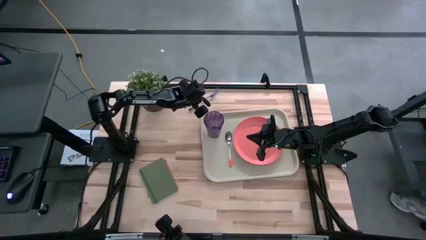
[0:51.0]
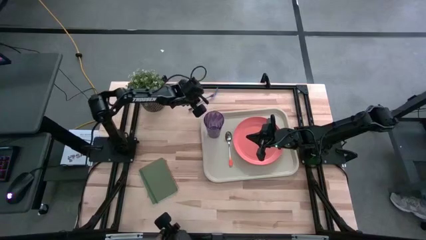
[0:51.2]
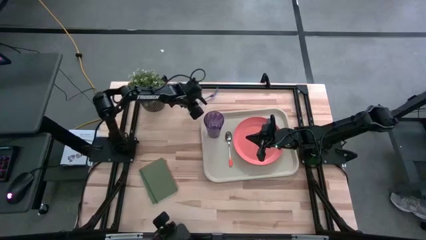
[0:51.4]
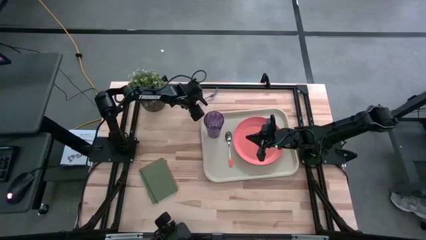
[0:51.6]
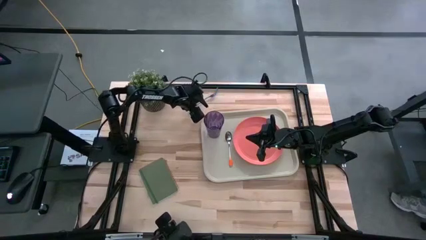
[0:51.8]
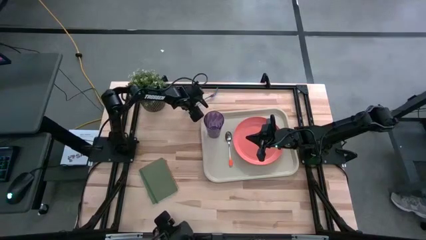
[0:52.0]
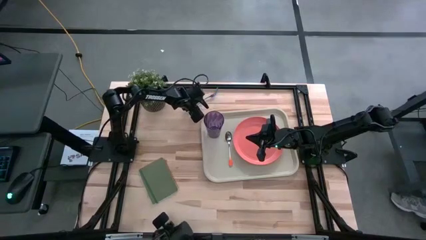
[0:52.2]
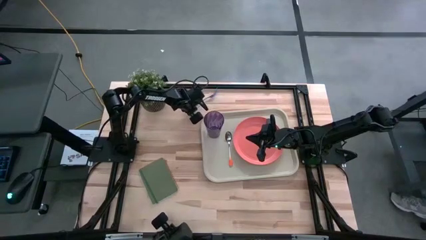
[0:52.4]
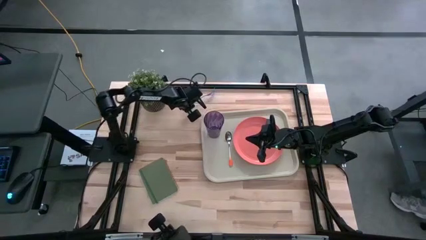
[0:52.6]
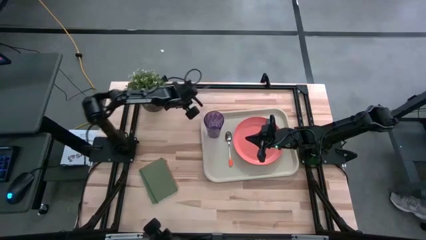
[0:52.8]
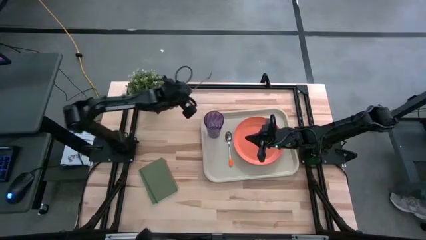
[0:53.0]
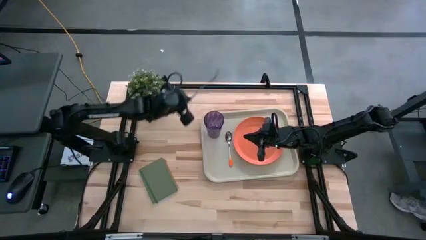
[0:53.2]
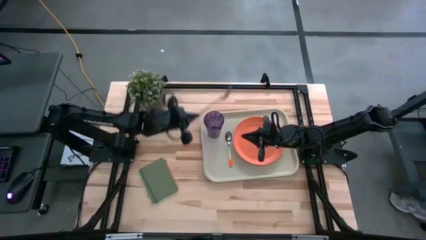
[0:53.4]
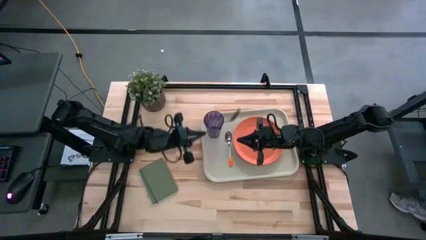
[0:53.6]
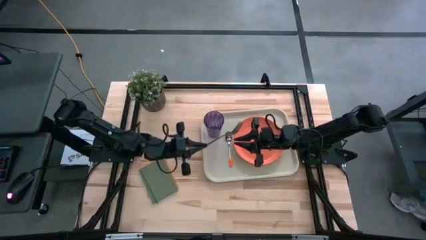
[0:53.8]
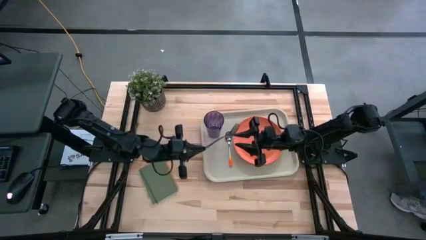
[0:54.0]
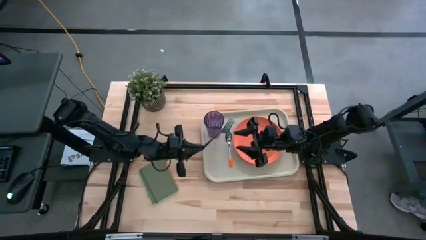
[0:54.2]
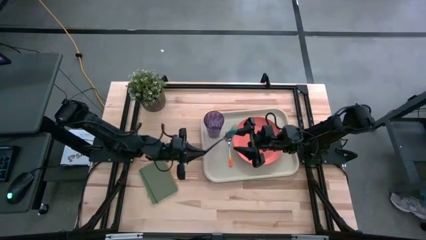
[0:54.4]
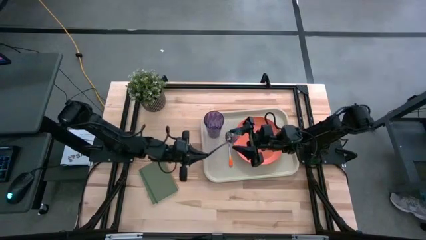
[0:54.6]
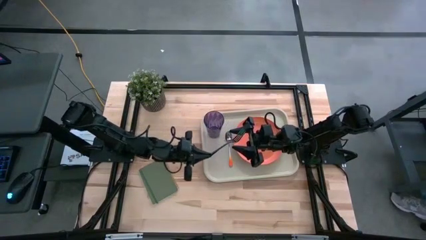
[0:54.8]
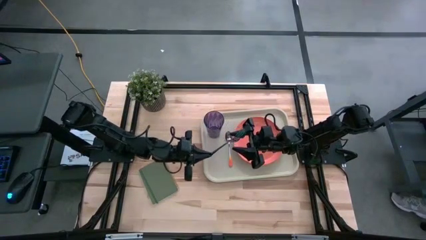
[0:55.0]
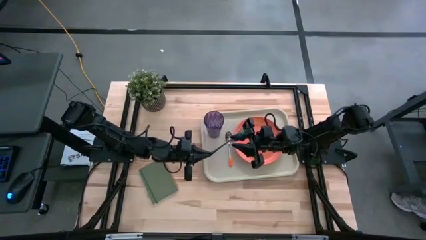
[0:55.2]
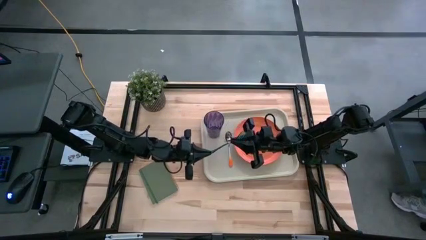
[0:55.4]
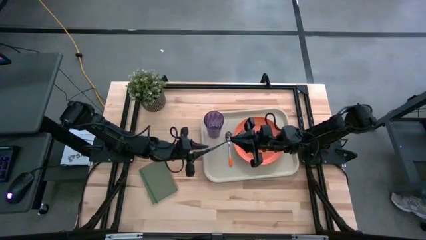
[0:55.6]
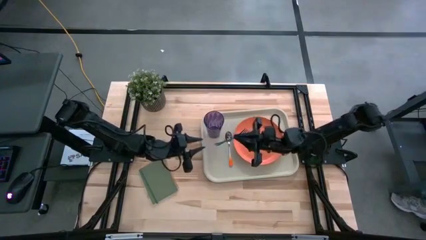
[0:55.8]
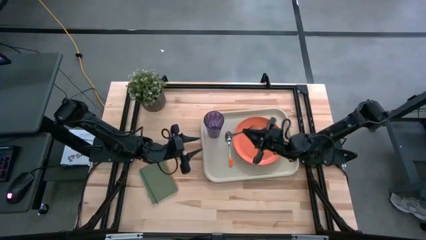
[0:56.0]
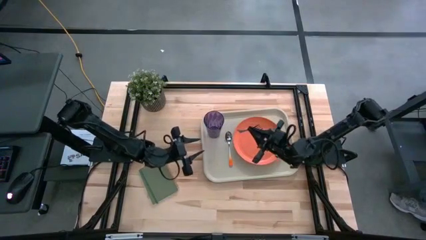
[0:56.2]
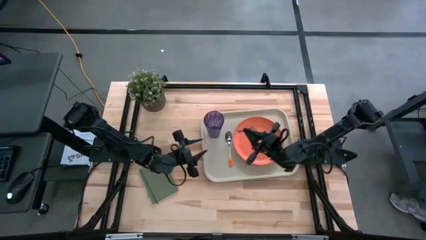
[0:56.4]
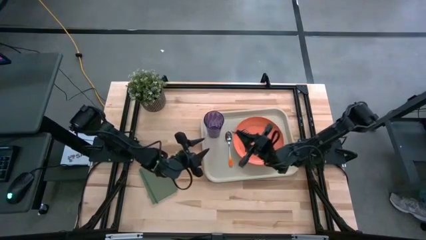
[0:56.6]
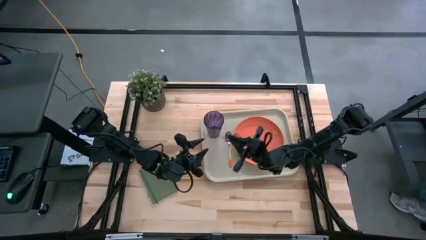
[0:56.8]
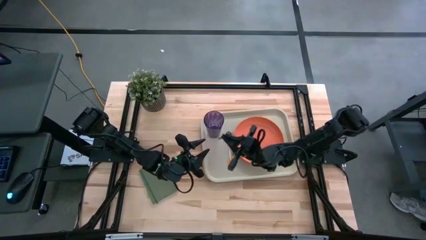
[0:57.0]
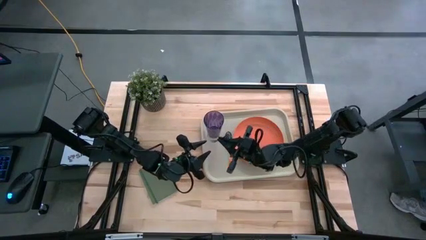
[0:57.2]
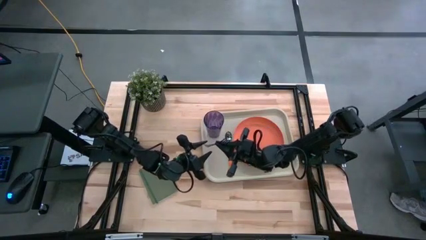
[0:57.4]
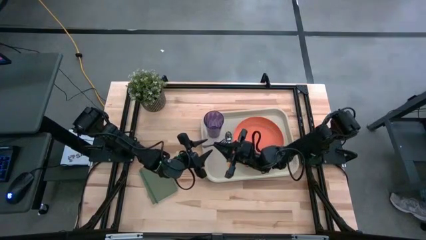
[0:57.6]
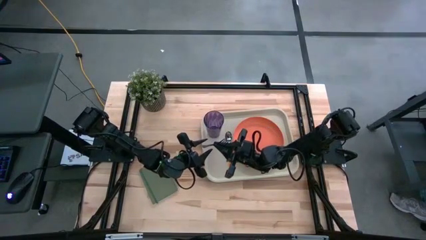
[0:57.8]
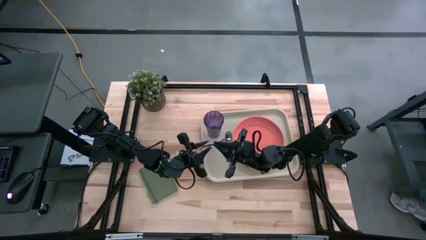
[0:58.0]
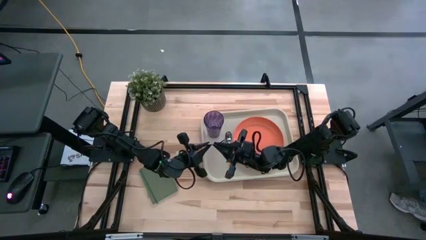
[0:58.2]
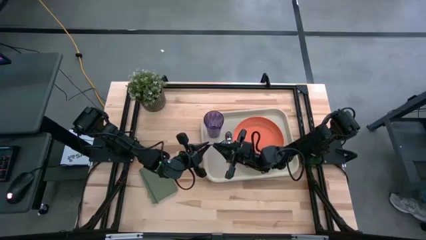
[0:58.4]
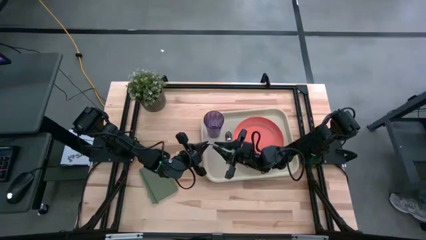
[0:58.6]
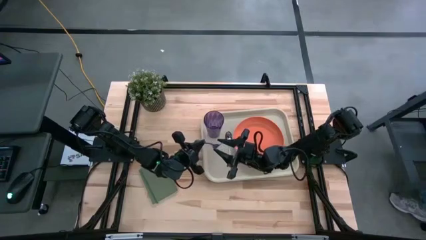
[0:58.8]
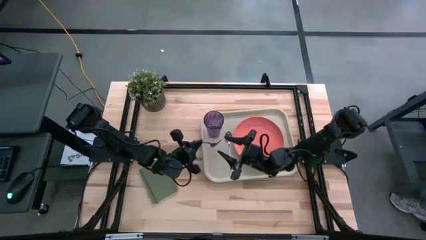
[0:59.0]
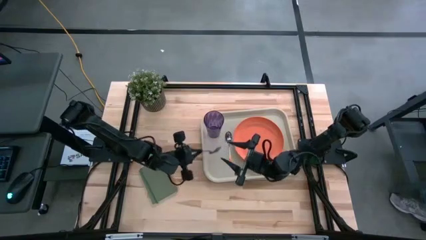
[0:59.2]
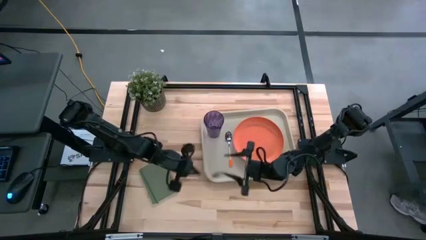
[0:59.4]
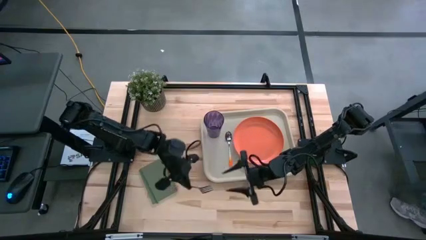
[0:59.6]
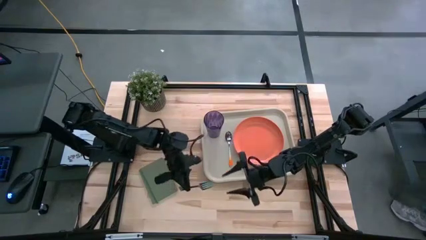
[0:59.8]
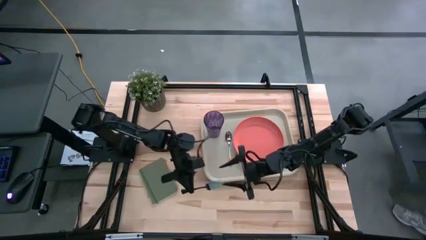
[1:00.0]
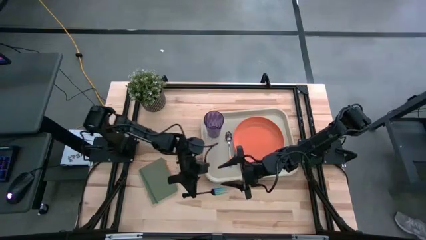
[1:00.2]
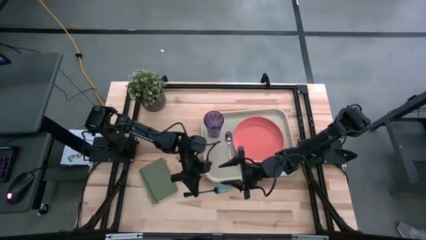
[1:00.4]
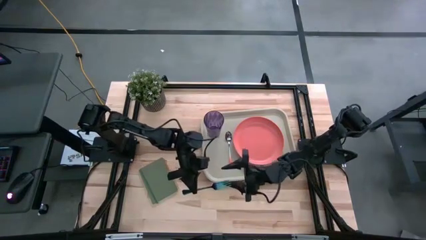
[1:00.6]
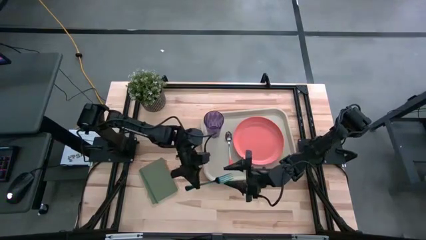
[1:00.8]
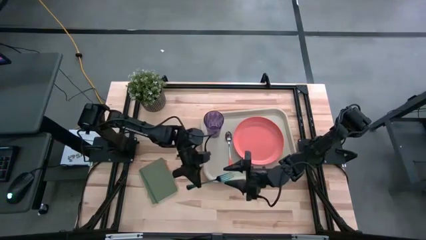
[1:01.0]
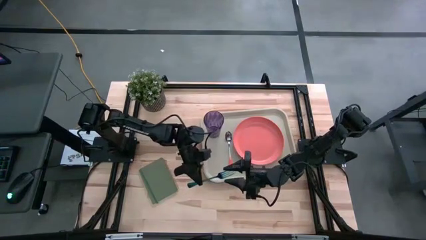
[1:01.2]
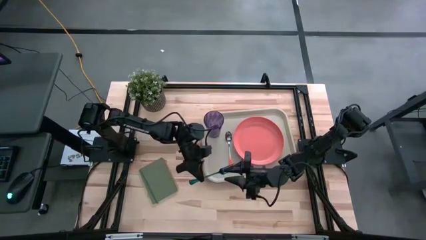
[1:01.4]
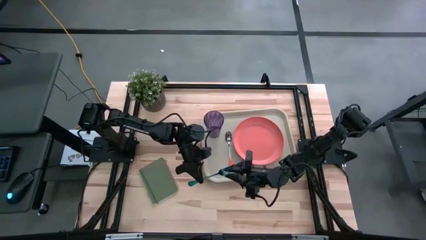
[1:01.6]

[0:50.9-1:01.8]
Task: Pick and place plate/cup/fork/spoon on tray
Put the blue fork on the gray serving tray to the left of the orange spoon

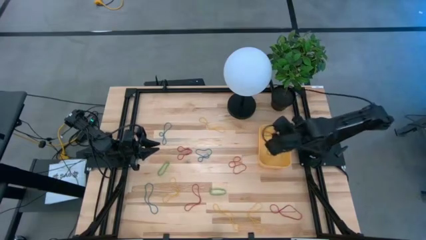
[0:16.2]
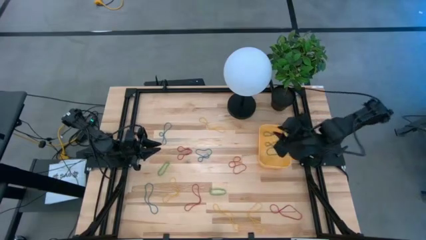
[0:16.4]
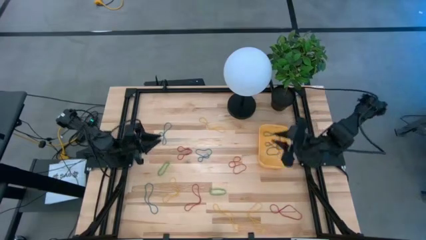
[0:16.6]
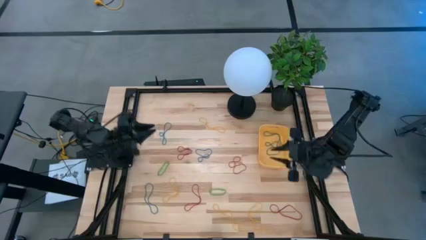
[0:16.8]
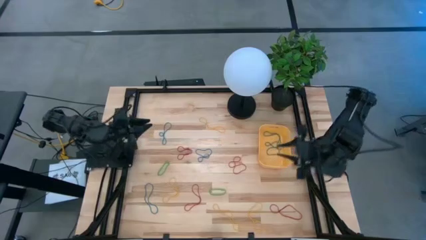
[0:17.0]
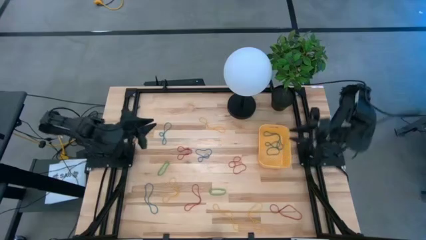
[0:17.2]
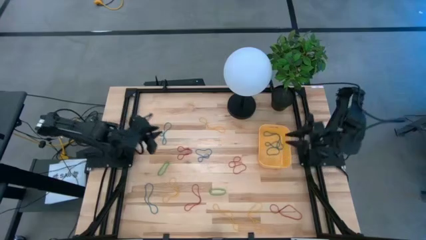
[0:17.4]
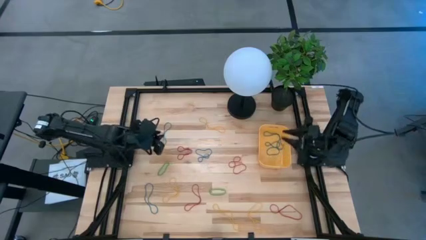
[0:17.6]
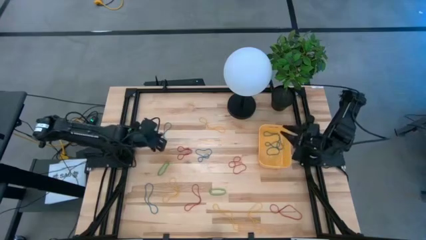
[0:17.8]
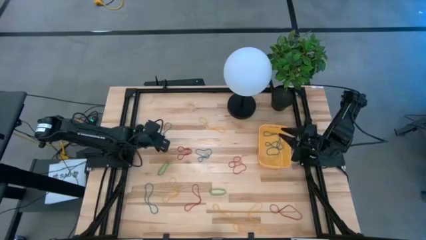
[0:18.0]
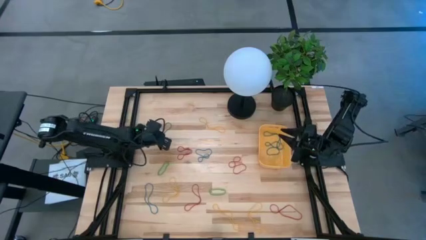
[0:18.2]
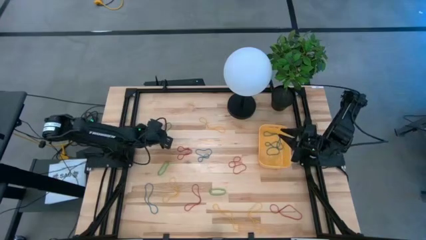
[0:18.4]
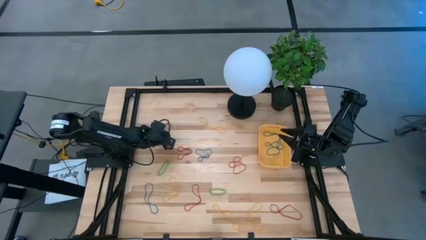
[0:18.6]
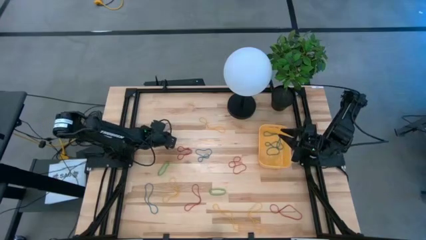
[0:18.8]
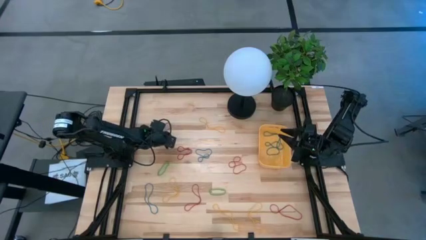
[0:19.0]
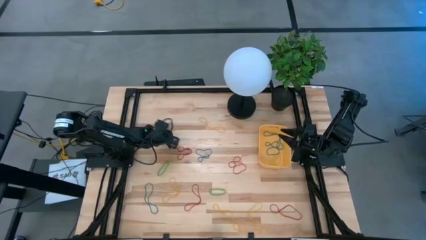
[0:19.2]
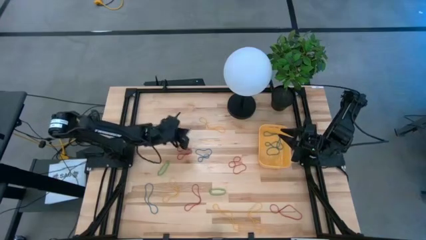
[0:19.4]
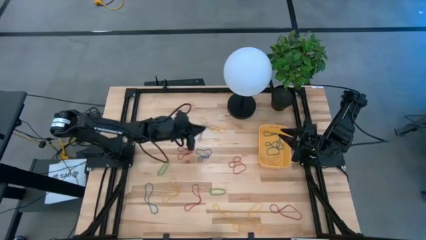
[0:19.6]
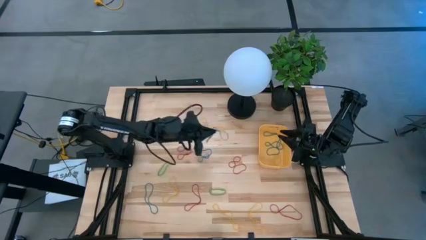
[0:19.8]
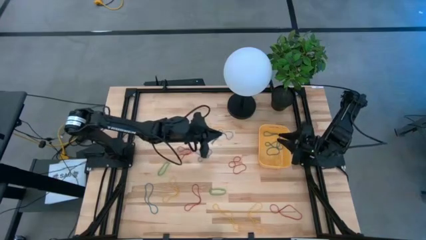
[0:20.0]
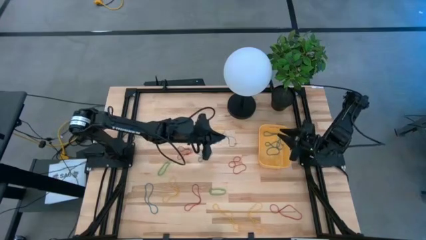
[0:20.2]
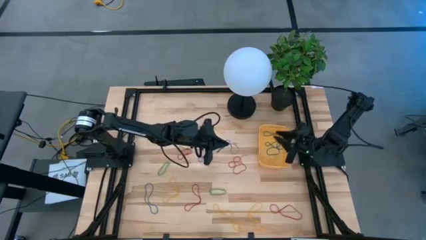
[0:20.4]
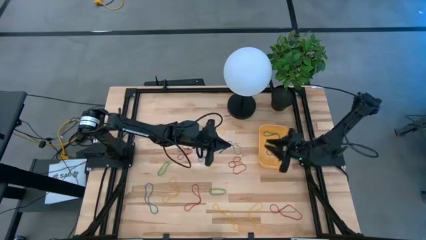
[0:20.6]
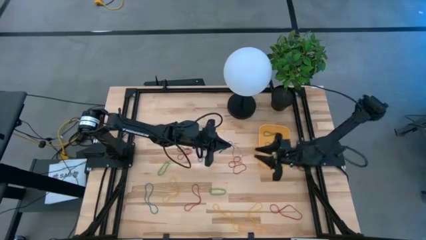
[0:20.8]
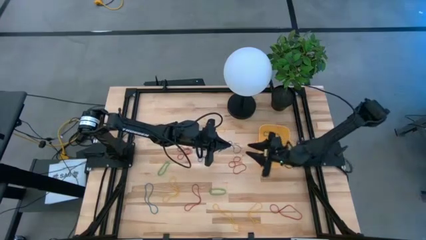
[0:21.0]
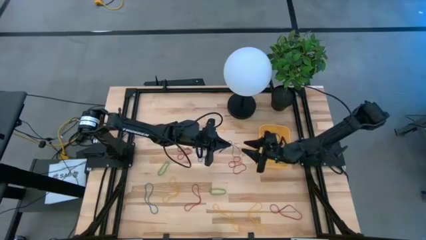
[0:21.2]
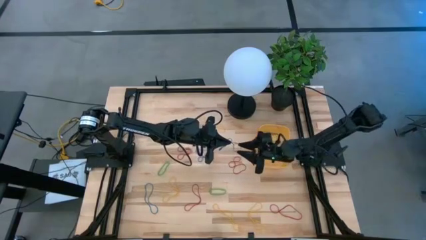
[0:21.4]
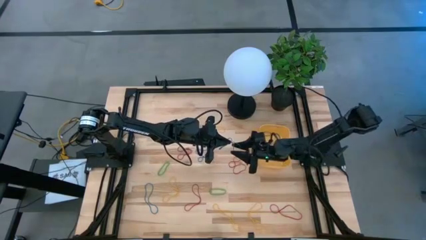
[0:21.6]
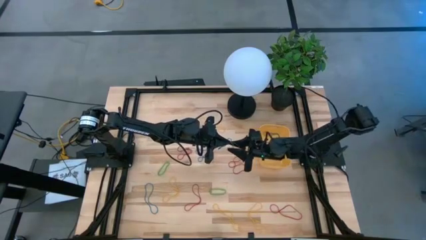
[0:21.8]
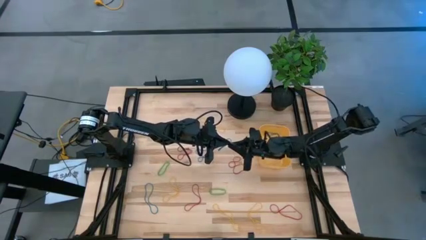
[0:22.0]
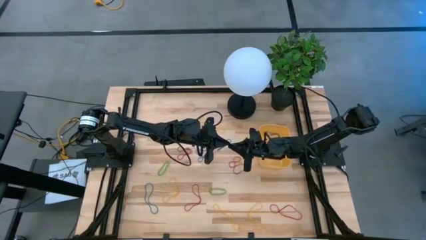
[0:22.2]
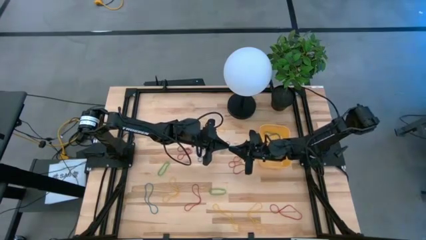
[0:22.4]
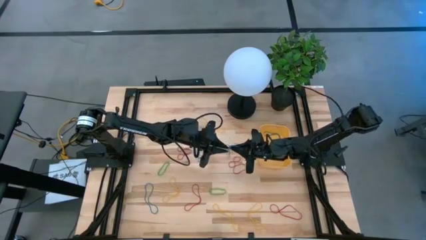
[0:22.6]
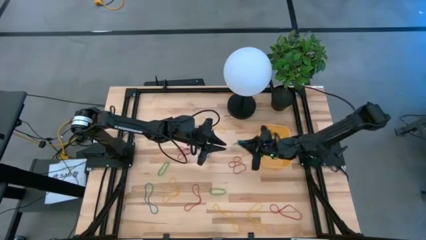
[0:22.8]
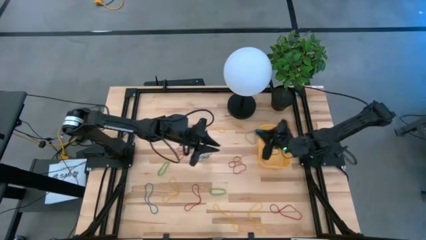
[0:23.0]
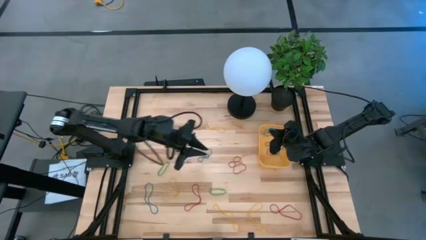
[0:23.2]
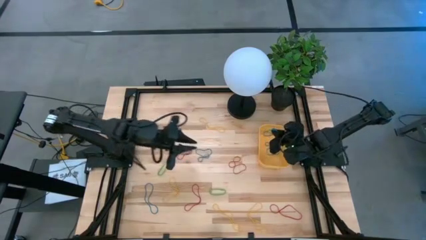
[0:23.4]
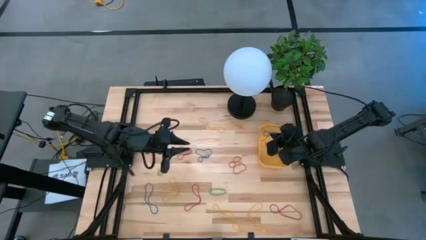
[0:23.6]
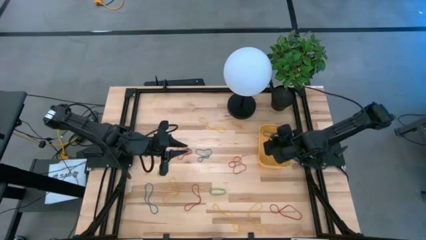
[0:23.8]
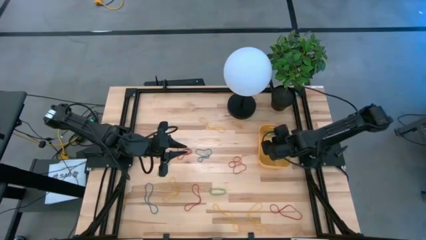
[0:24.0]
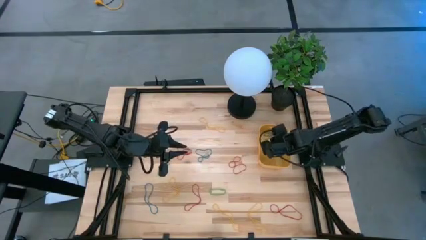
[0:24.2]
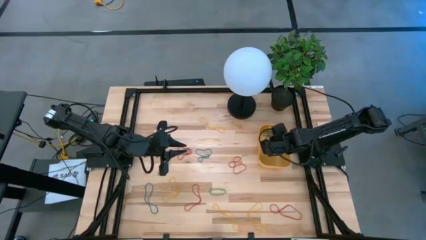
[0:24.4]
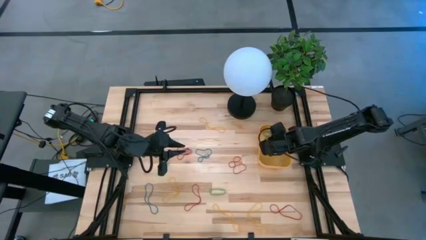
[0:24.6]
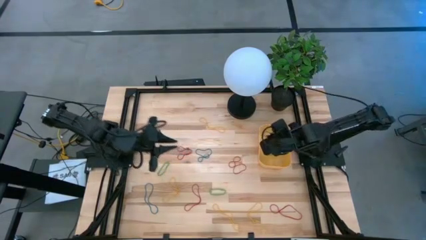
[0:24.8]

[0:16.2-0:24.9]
Task: Pick and place items into bin
Put the blue rubber band into the bin
